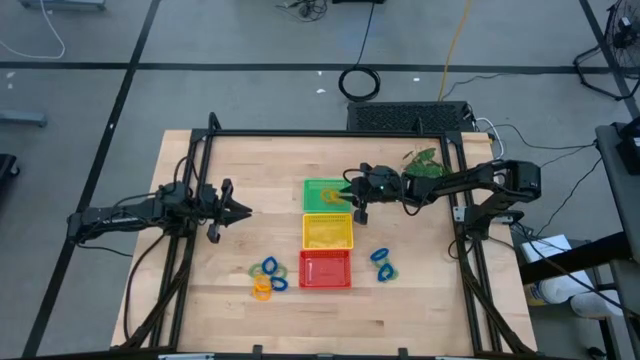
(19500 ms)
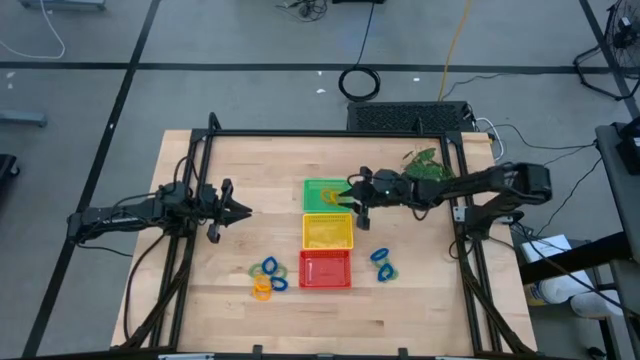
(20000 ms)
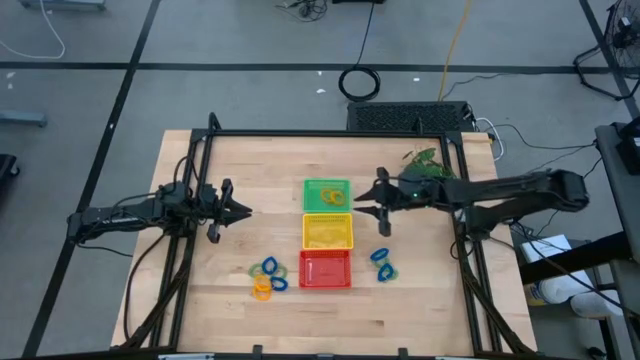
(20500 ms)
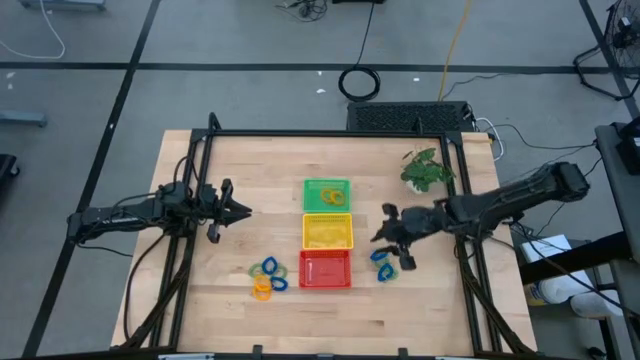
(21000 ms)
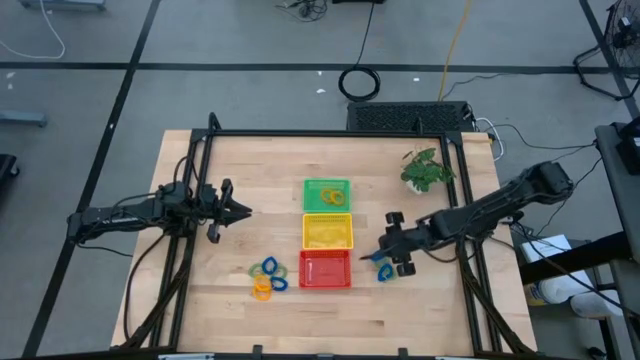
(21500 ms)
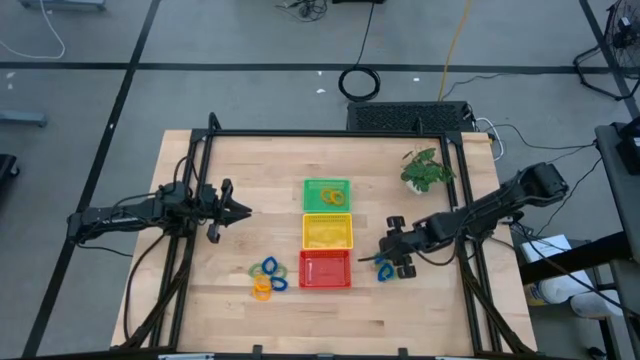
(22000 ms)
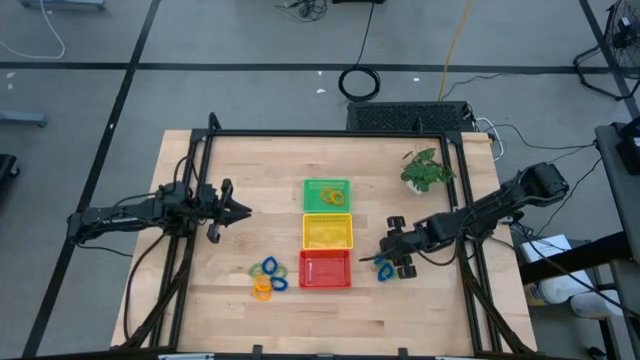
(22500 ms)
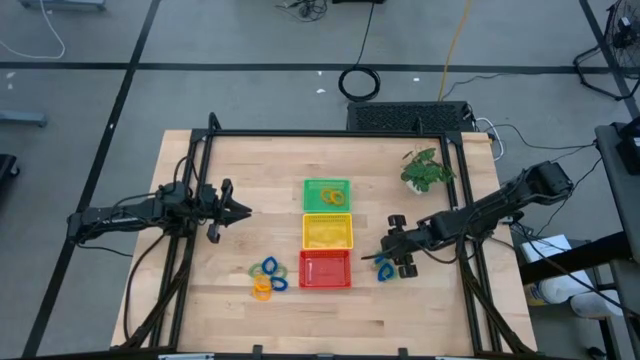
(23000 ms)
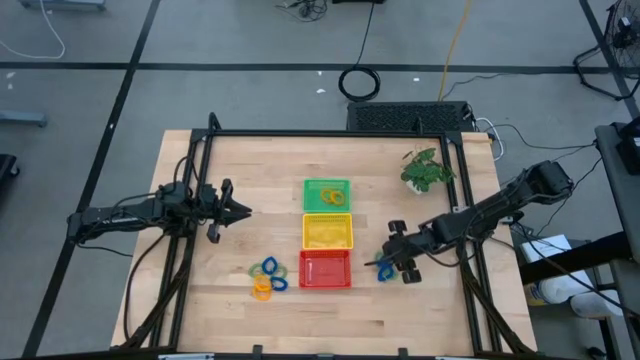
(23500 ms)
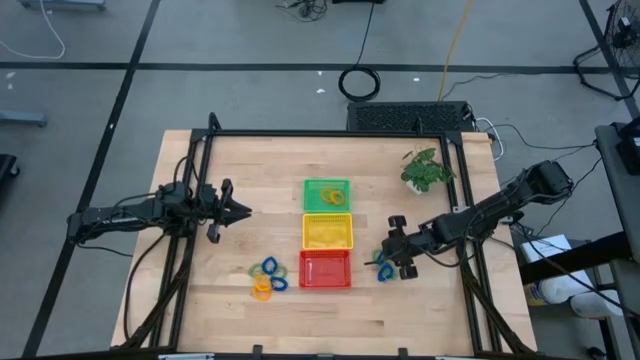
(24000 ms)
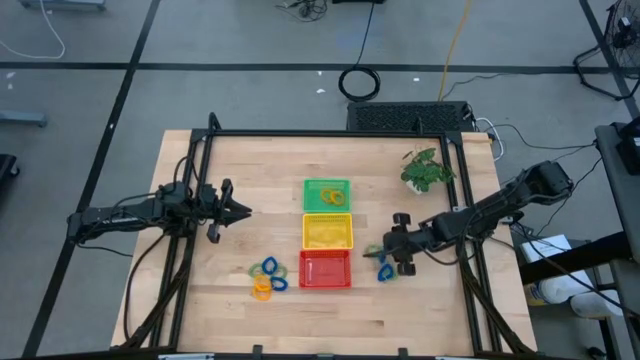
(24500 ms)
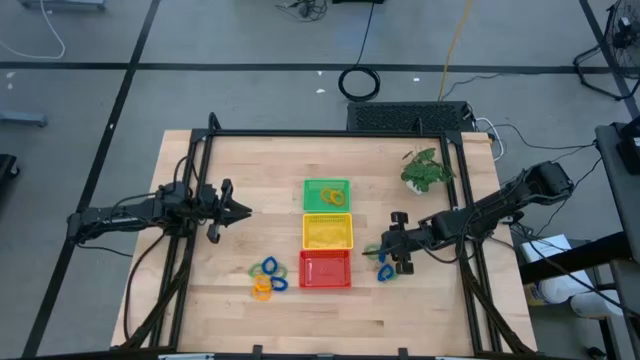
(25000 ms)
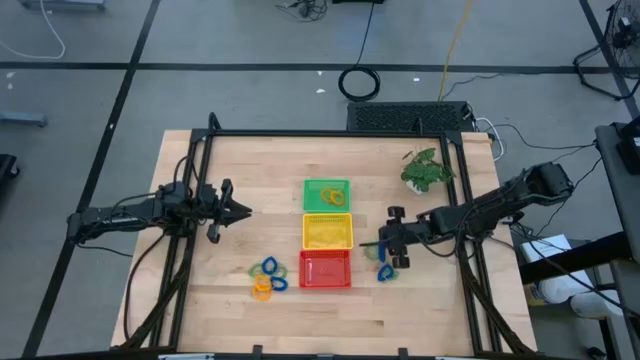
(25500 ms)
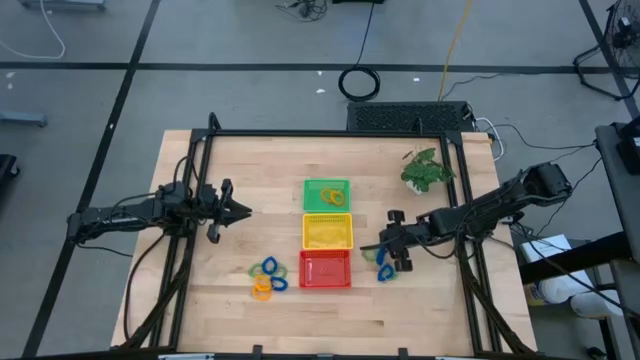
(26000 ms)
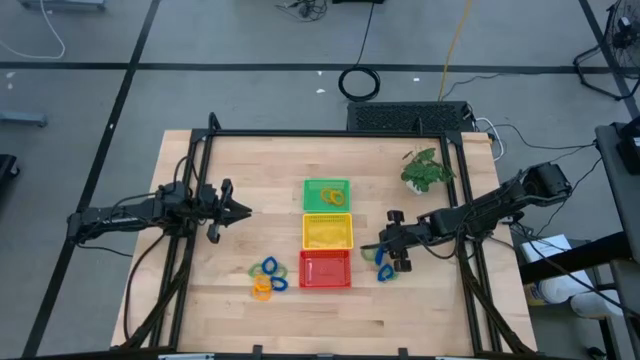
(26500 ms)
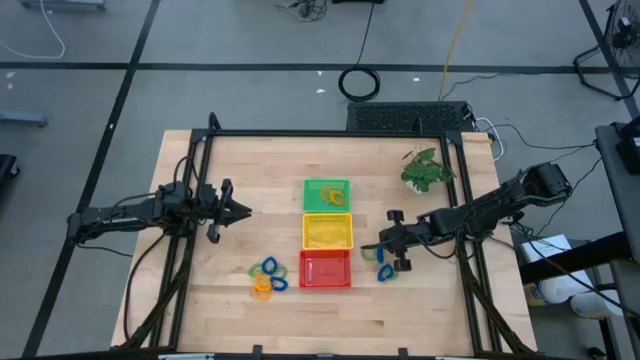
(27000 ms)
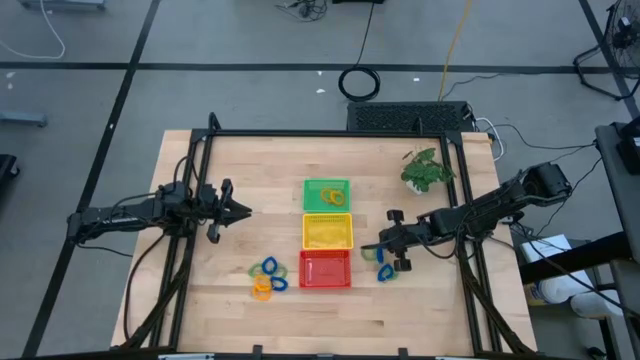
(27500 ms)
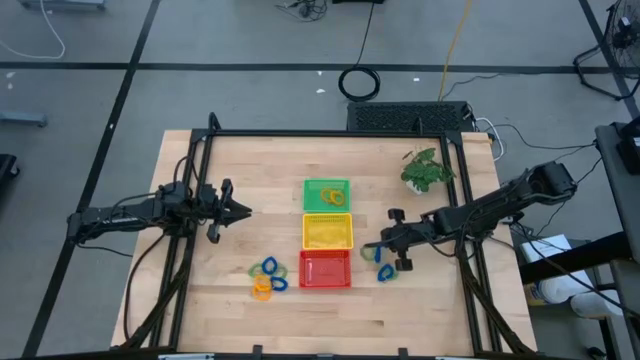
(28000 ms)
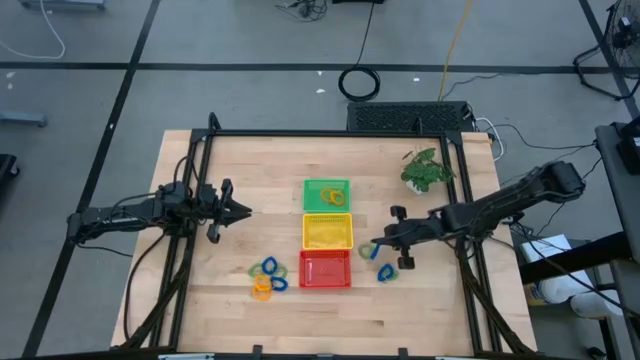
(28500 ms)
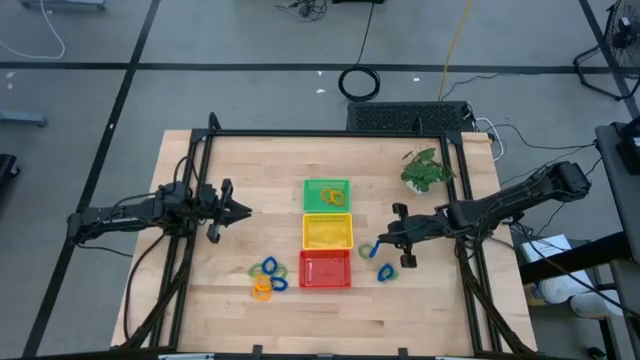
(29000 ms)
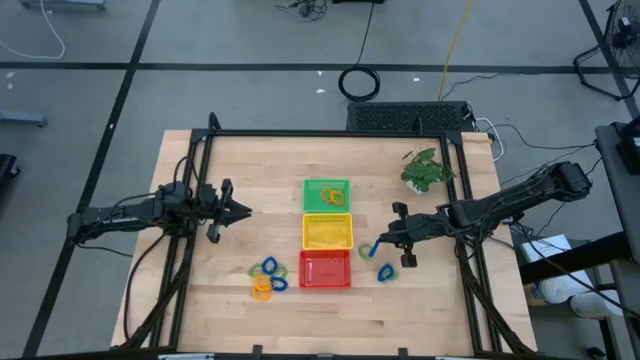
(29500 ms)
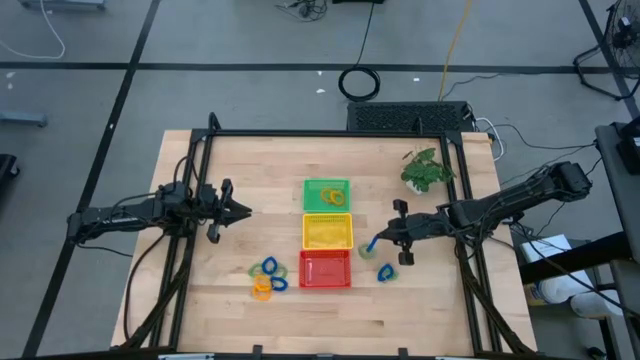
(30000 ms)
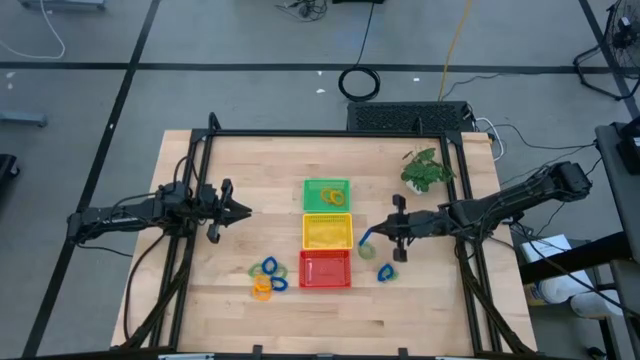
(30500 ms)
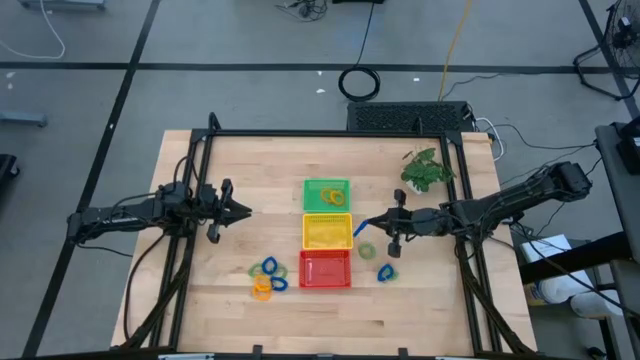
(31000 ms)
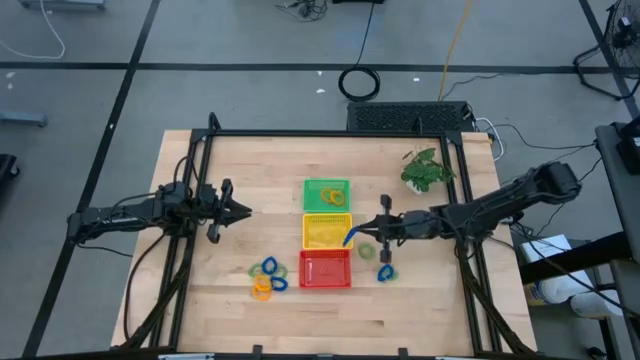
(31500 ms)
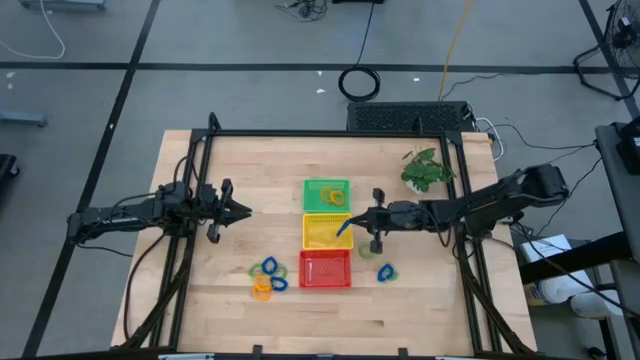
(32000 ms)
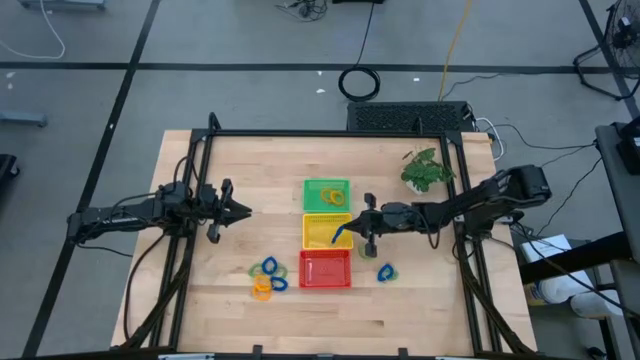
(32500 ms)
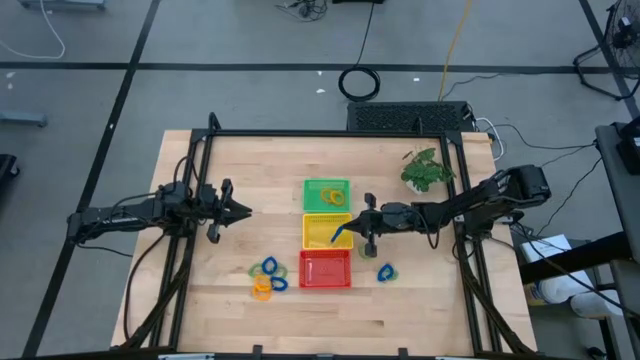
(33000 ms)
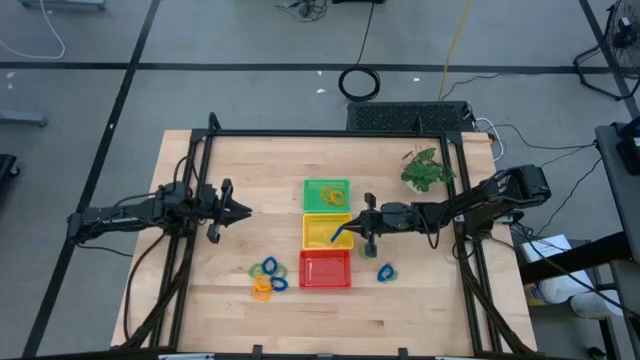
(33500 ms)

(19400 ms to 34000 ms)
Task: Sort spring keychains into baskets
Put the blue spring keychain into the yellow basket

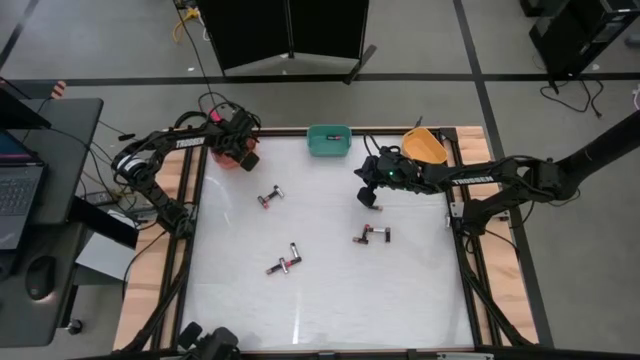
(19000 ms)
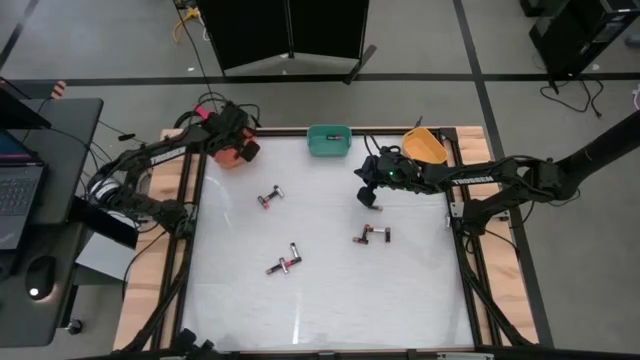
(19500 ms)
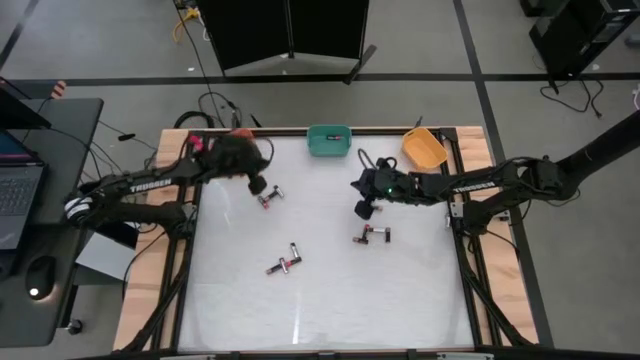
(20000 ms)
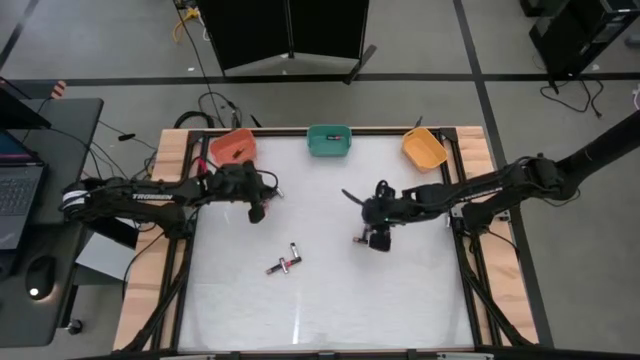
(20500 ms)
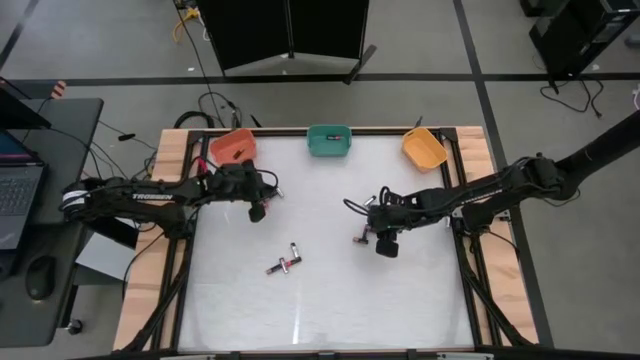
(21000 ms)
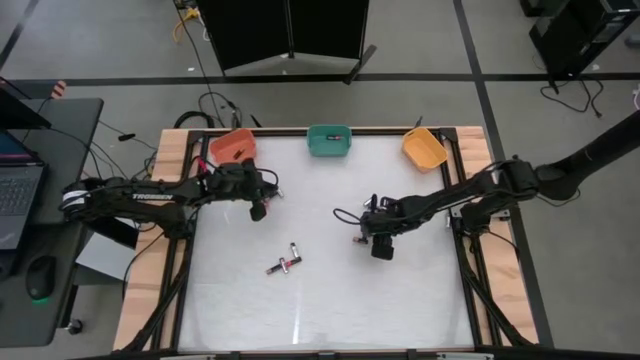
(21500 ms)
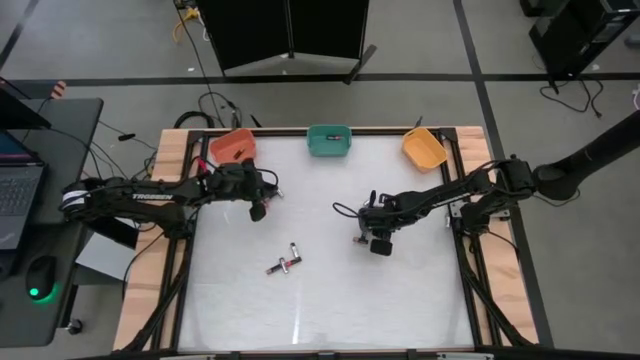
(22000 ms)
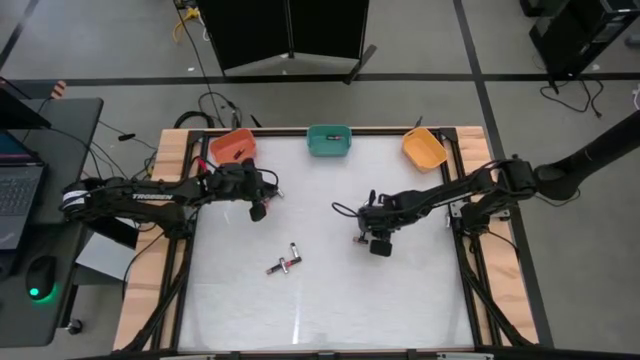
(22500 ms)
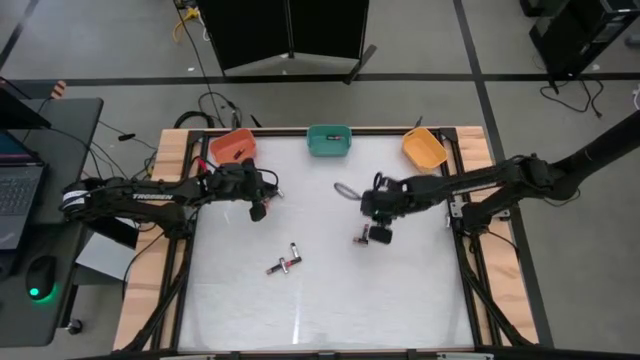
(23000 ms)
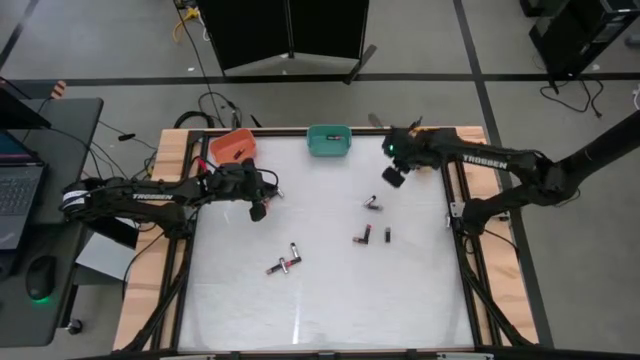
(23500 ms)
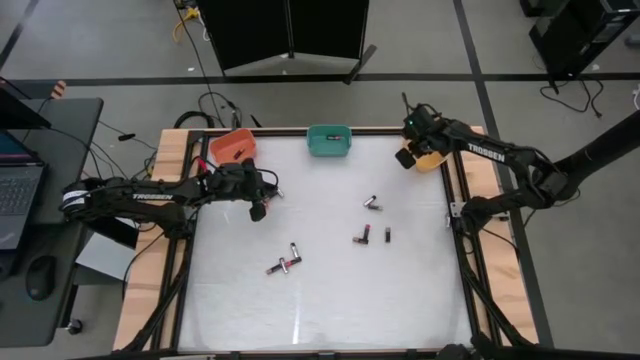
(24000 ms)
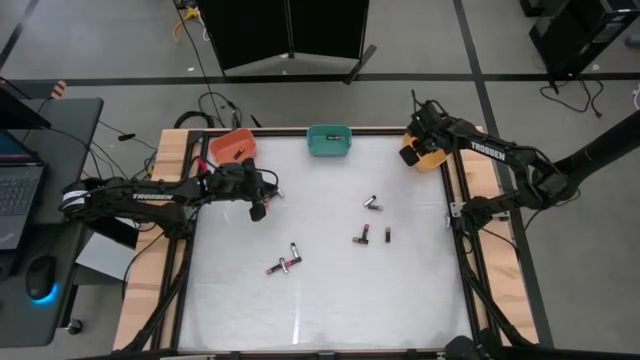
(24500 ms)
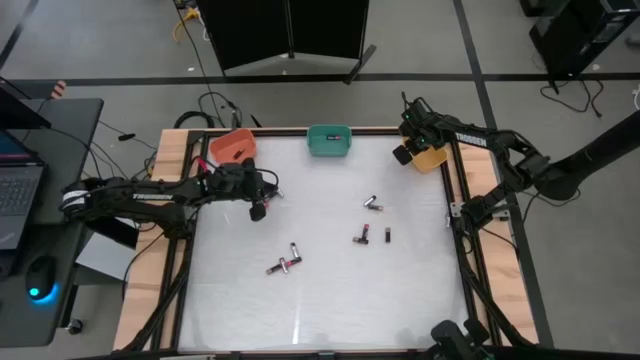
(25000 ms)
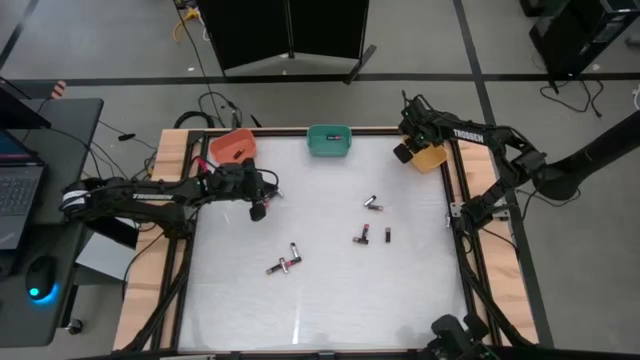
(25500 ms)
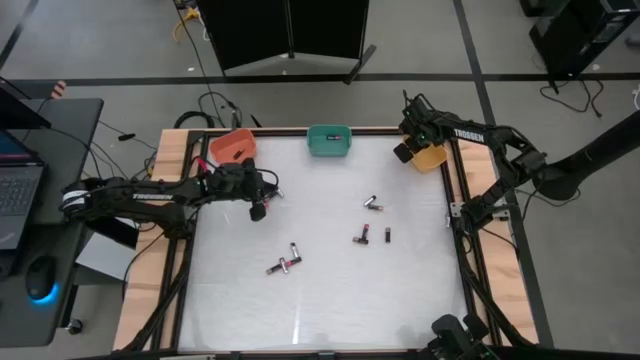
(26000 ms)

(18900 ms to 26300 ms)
Task: Sort batteries
Put the silver battery into the yellow bin
